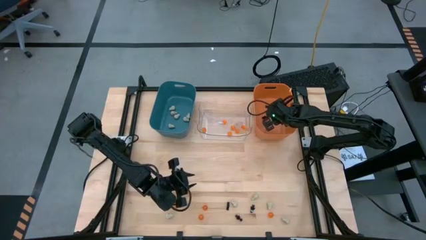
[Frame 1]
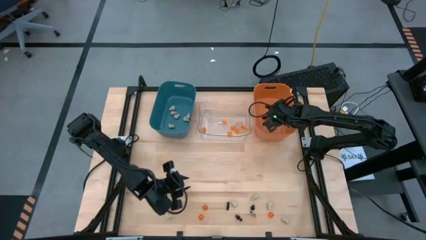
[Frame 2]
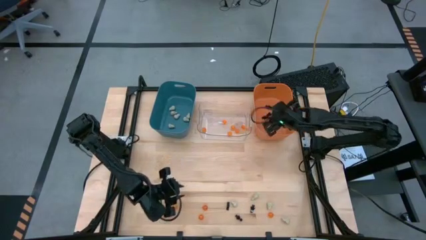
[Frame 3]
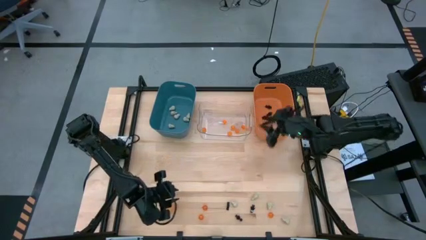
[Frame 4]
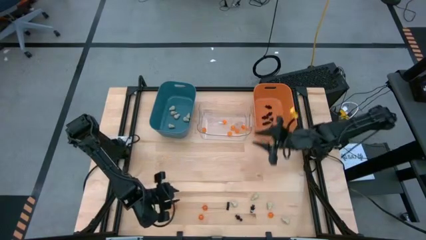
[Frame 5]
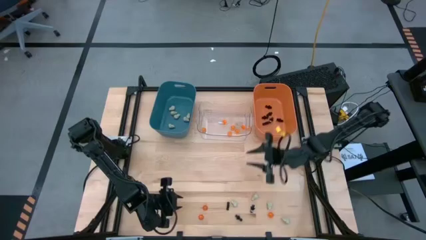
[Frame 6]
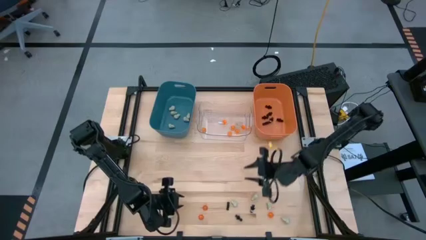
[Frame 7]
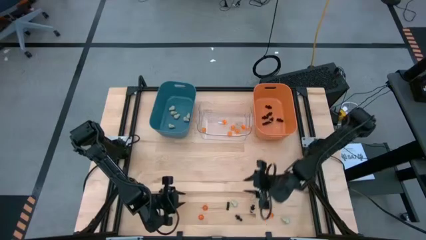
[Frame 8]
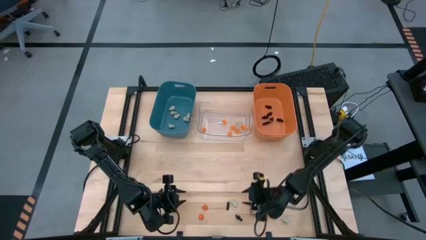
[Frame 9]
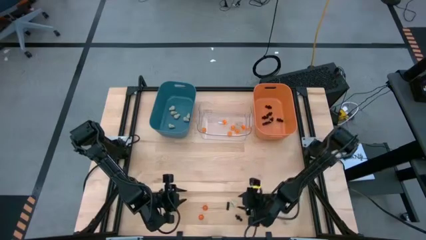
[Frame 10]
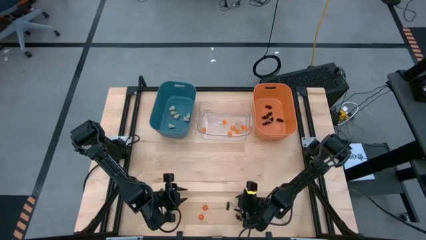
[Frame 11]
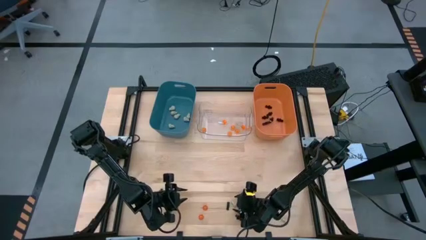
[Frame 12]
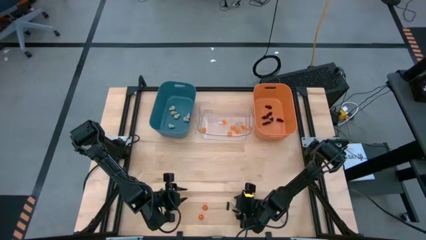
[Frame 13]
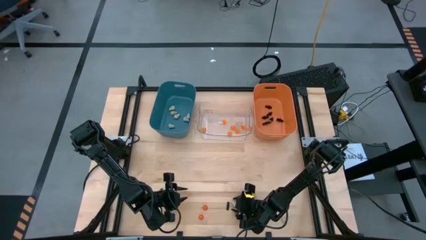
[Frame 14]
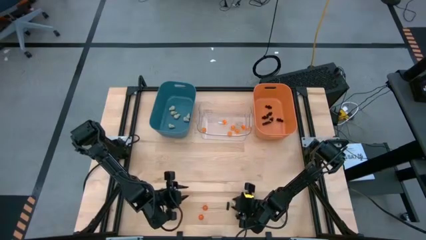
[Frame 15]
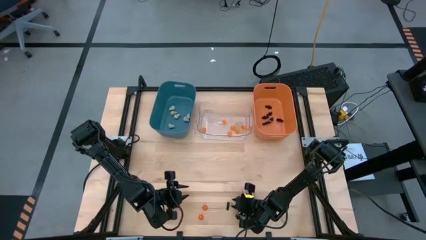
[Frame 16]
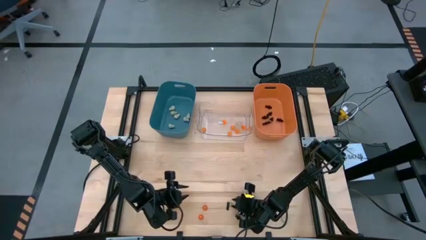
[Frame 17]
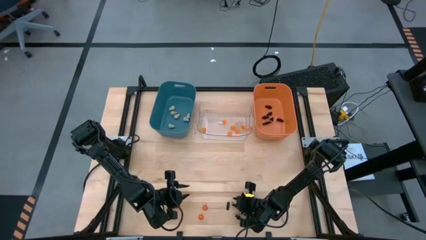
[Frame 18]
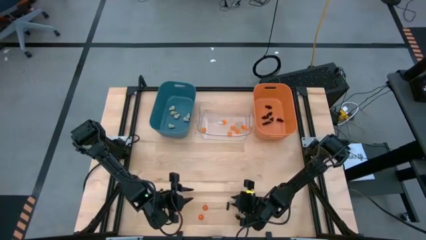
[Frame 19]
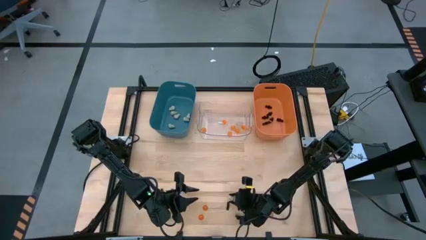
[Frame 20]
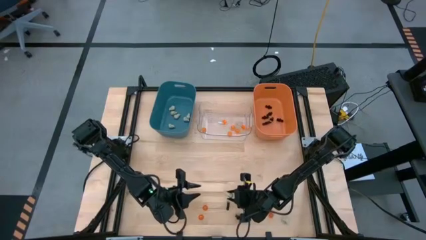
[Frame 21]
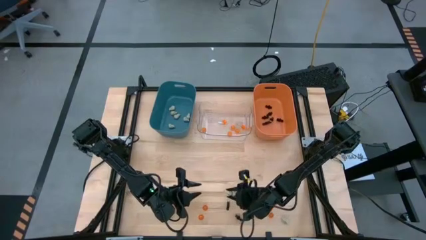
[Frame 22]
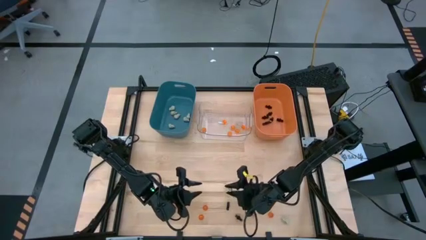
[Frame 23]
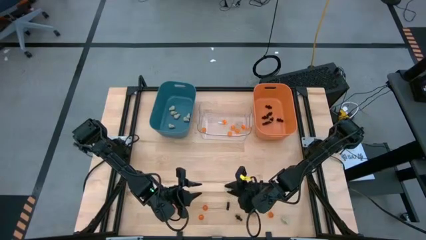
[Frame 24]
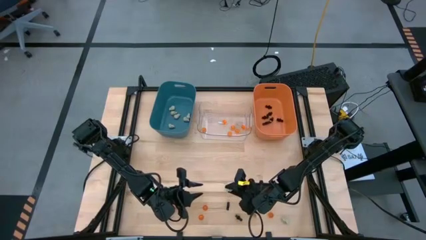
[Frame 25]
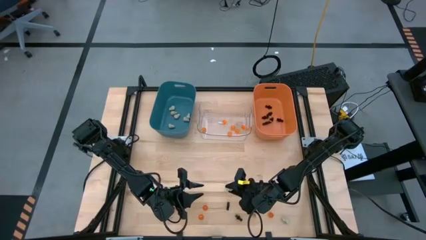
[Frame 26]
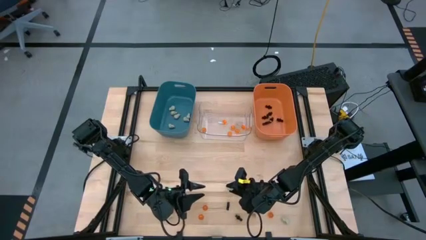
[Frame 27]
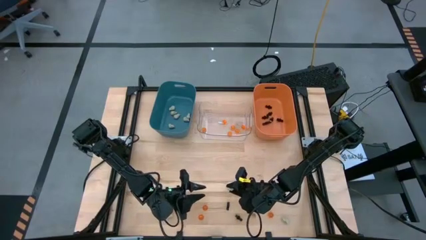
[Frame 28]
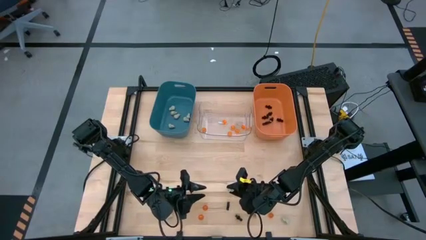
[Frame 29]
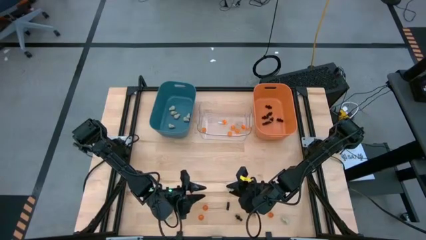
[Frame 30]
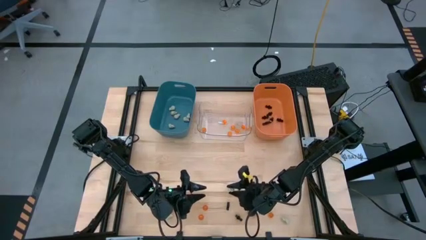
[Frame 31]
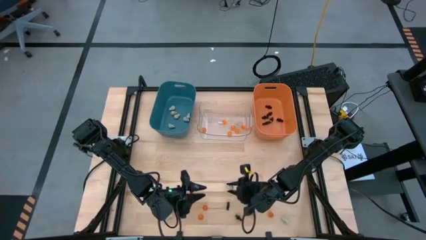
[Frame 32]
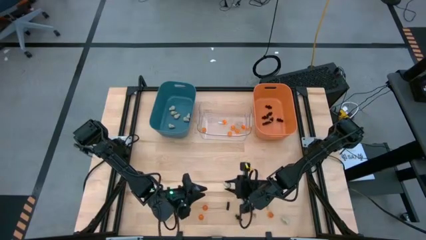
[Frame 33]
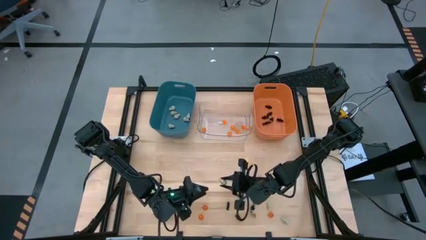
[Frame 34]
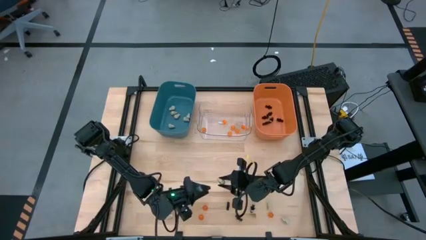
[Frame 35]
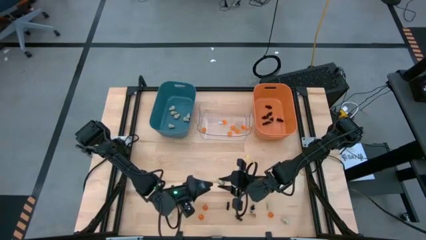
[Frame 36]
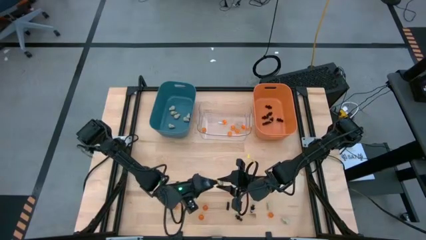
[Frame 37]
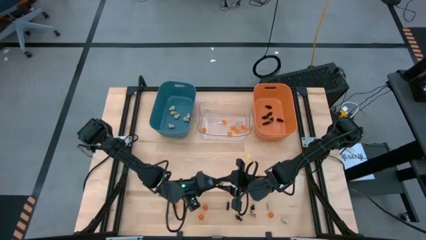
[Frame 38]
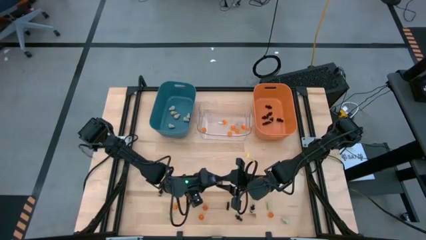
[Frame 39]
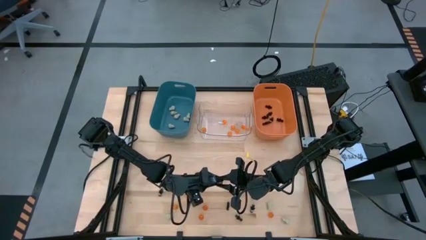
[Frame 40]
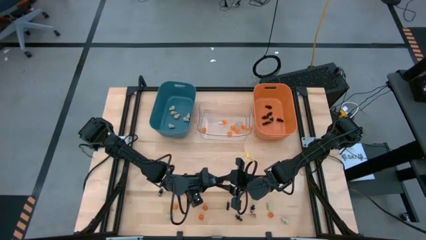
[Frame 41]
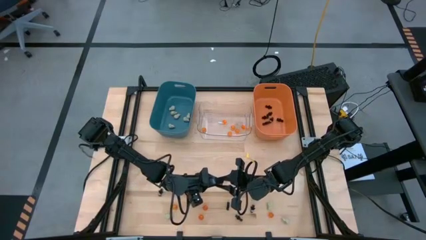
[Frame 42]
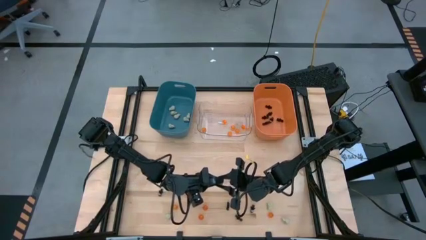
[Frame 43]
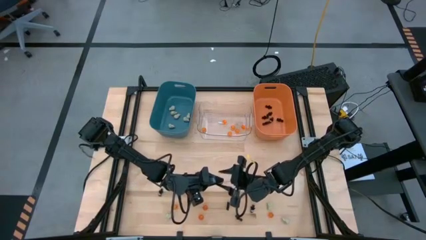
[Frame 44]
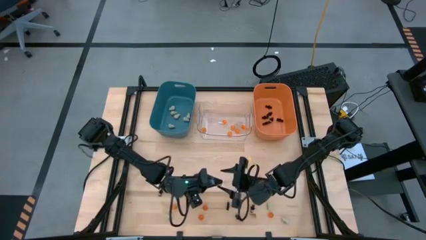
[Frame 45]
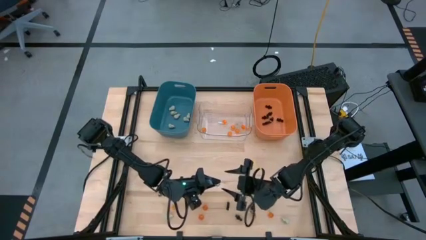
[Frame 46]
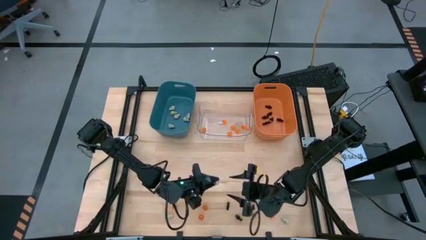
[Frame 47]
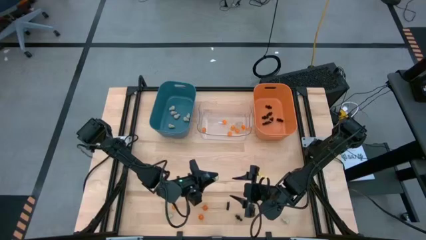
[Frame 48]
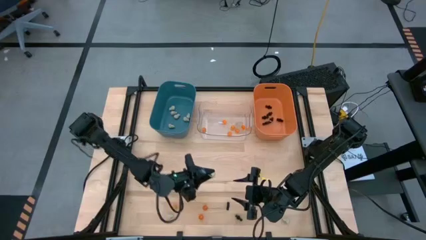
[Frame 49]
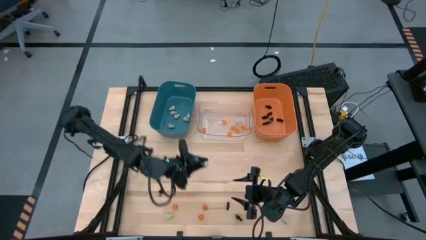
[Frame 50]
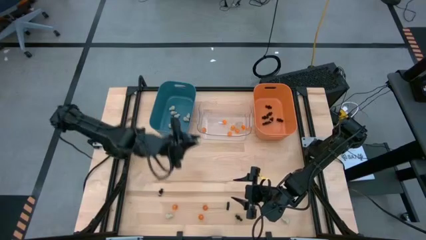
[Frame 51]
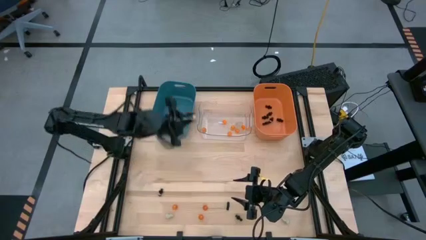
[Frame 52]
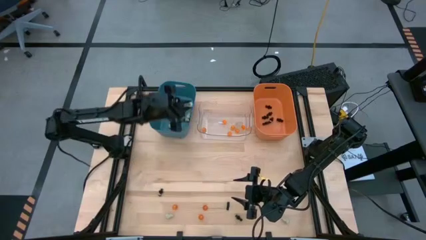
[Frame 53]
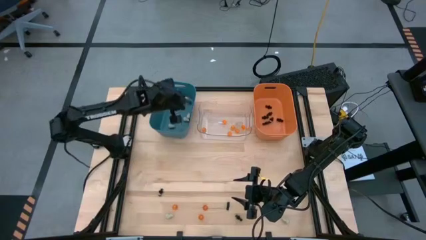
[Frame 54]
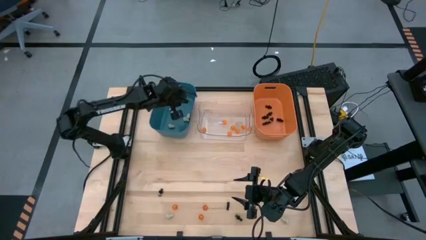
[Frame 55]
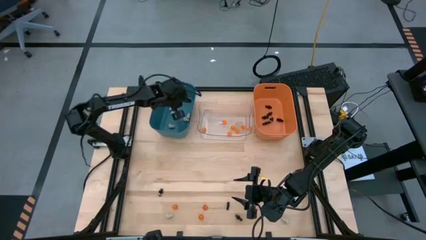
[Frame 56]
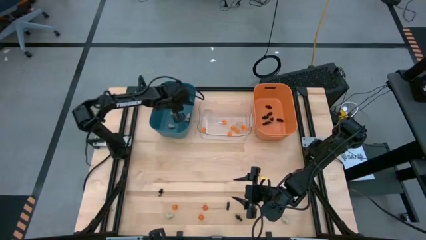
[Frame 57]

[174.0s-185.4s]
Task: Sort Halloween decoration
Put the white skull toy into the blue bin

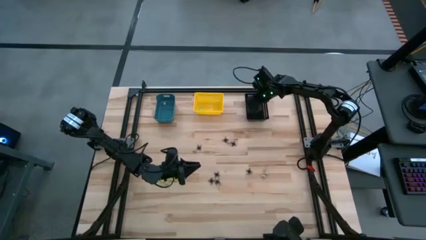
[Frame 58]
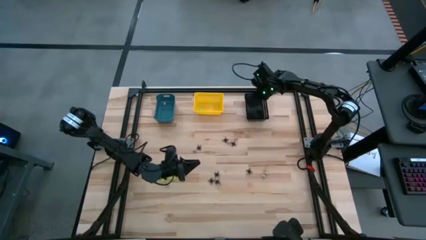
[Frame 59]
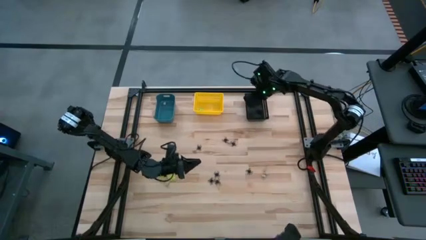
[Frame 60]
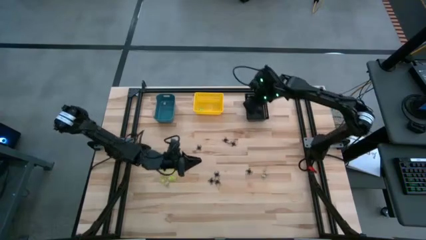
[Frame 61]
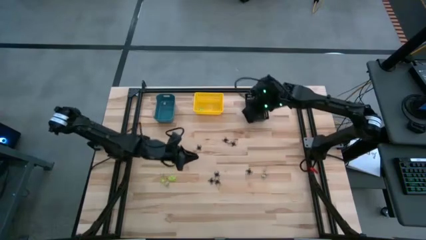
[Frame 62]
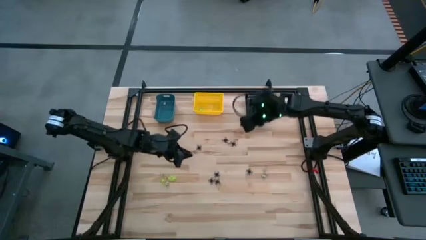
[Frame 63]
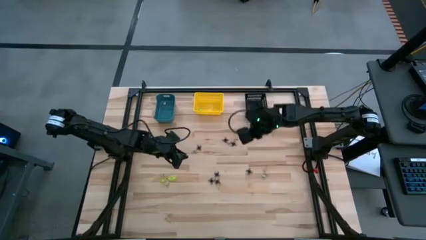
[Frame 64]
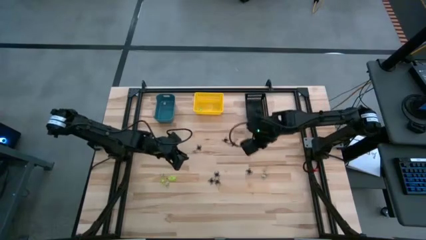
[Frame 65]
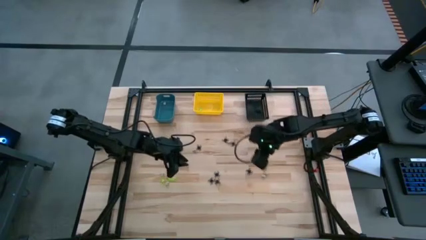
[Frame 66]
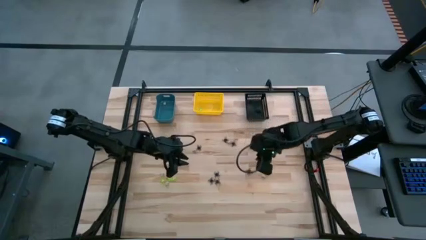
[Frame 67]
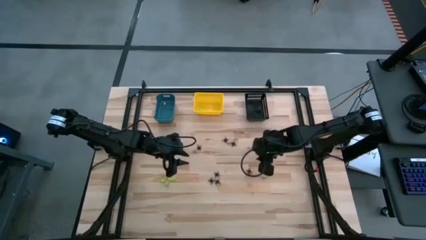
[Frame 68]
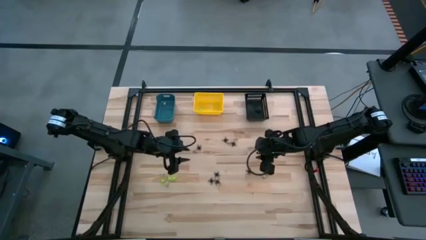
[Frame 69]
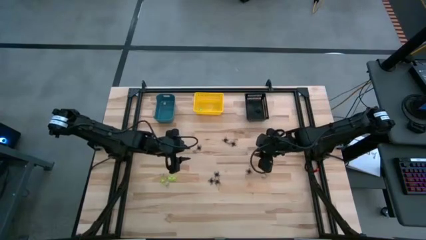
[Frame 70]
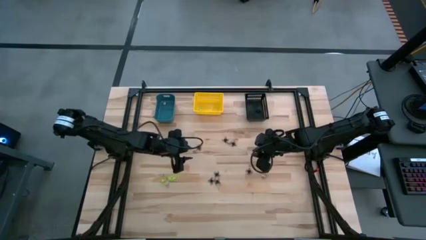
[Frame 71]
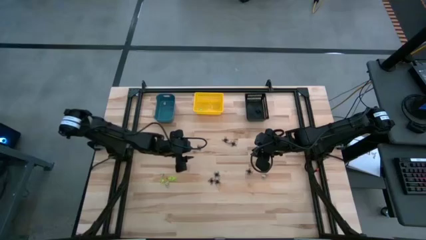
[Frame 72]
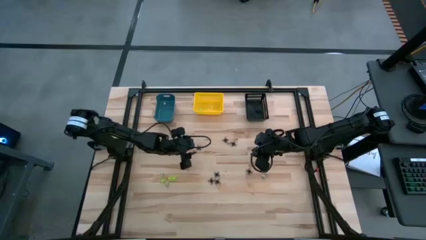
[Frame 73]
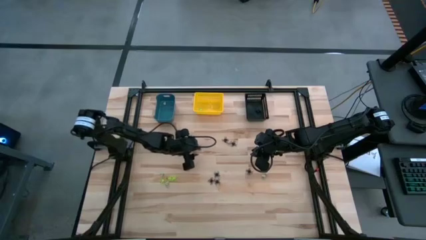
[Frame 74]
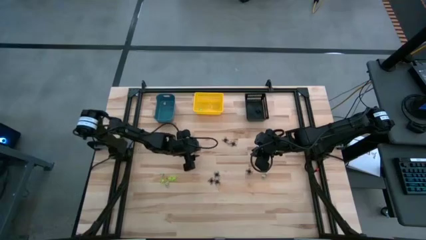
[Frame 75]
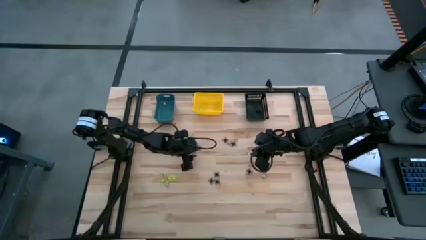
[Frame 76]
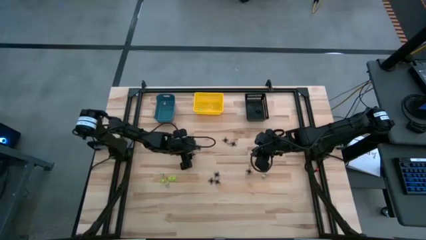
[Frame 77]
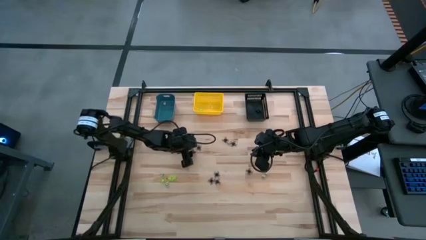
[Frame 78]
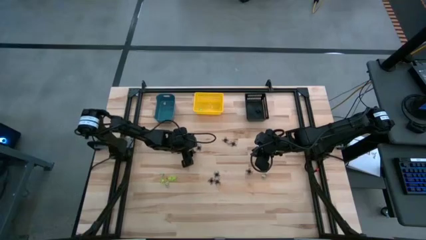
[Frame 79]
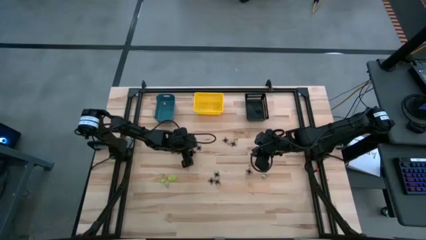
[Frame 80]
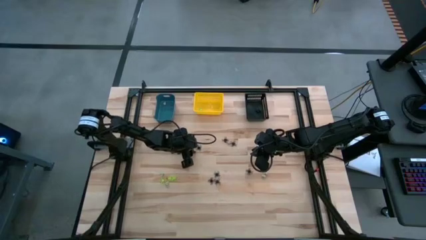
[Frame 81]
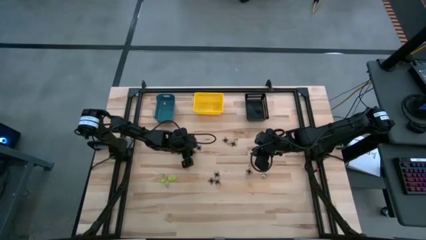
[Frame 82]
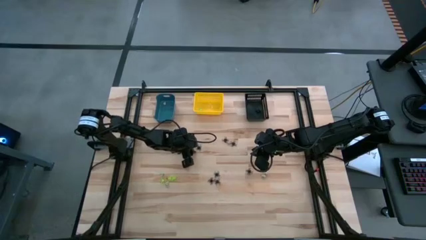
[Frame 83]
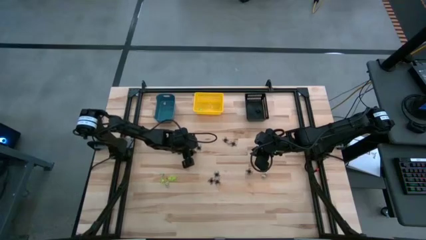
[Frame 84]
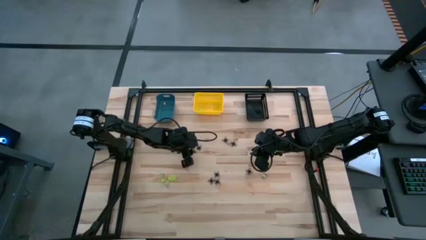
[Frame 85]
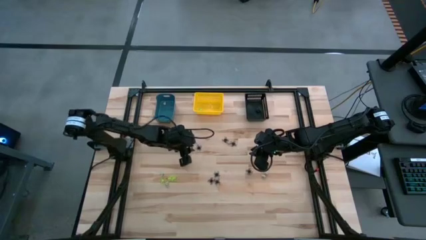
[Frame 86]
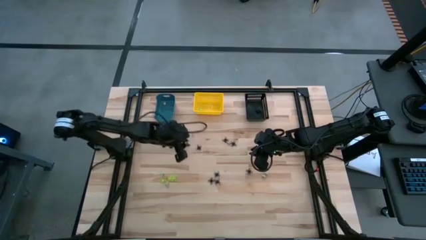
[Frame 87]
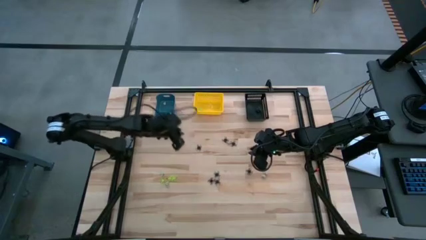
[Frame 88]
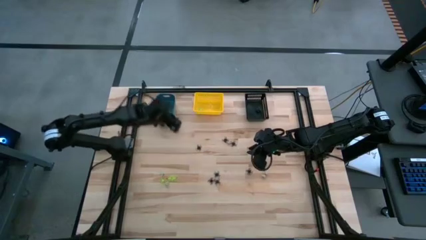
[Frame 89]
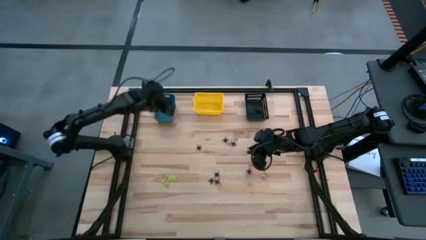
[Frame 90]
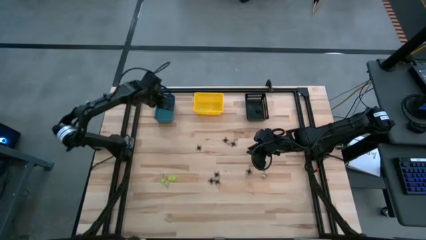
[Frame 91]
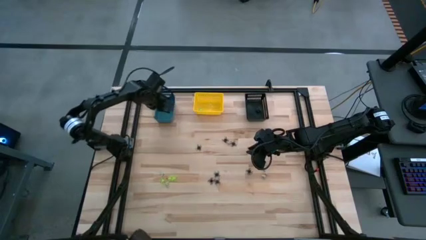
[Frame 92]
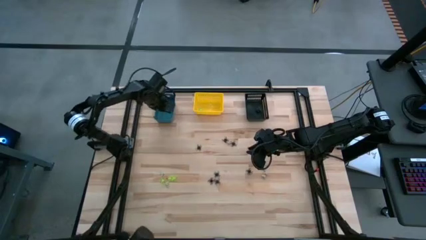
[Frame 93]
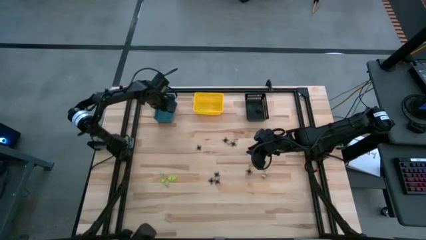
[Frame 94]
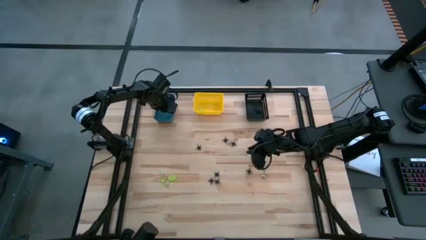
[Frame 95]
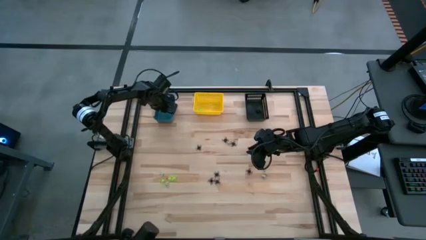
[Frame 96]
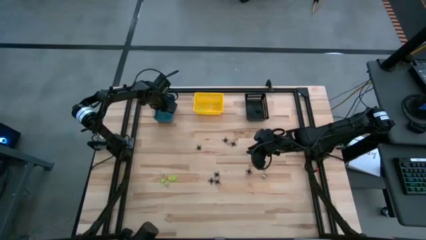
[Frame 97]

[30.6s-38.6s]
Task: Sort Halloween decoration
Put the gray skull toy into the blue bin
